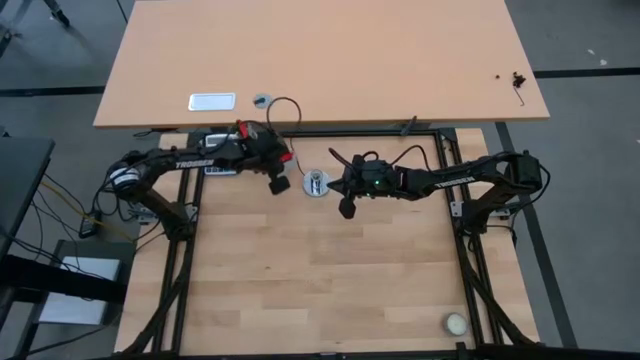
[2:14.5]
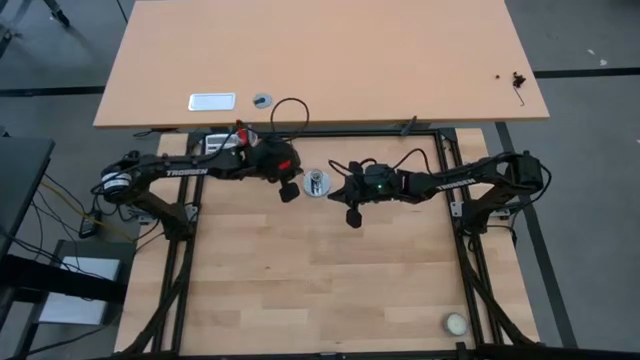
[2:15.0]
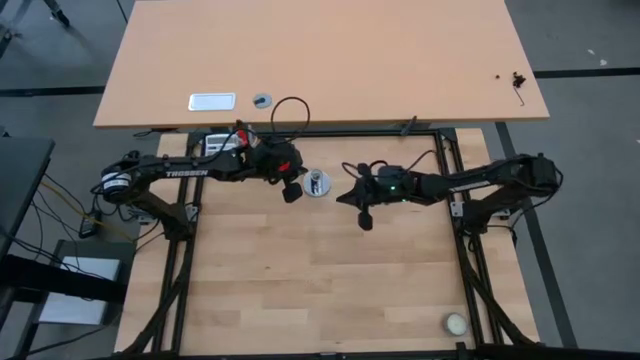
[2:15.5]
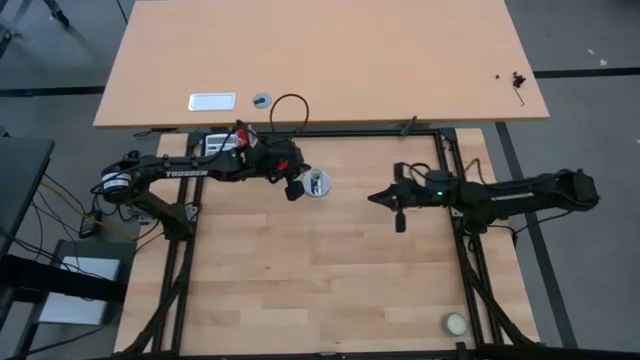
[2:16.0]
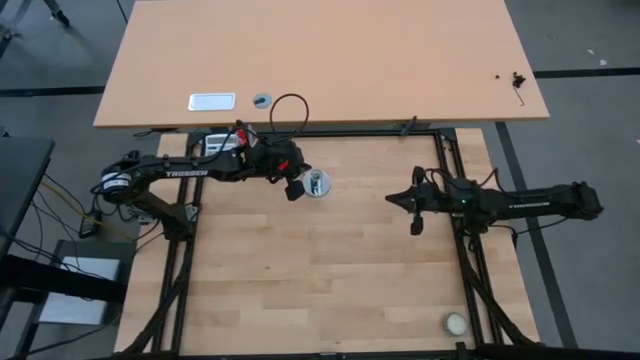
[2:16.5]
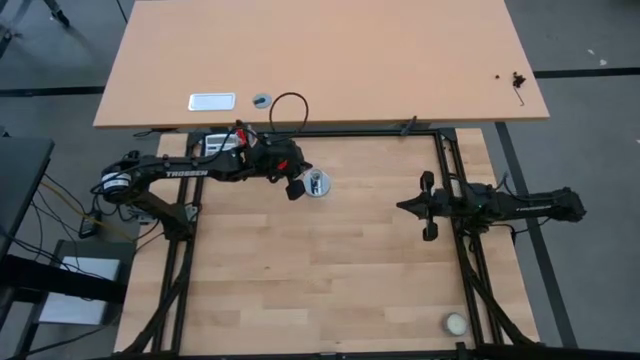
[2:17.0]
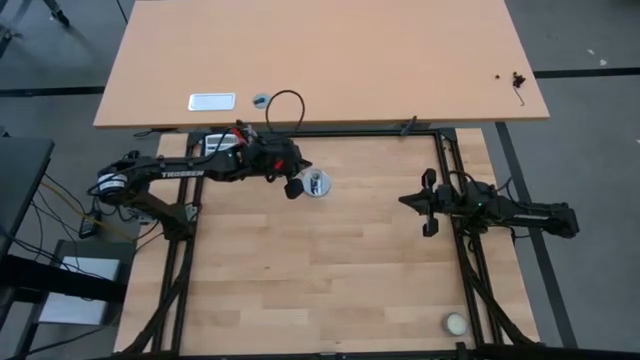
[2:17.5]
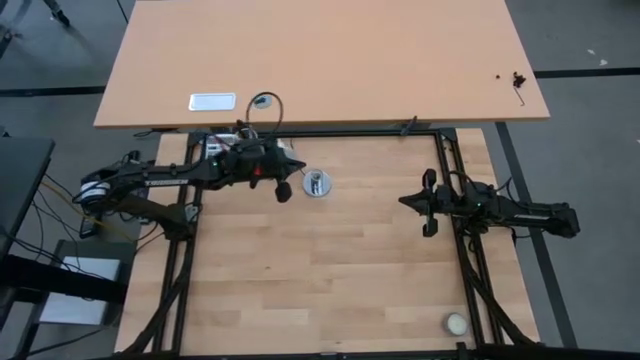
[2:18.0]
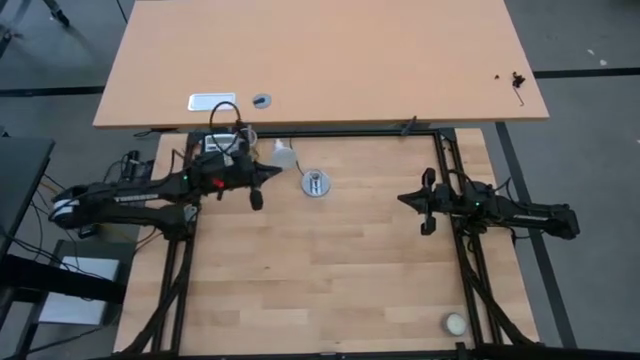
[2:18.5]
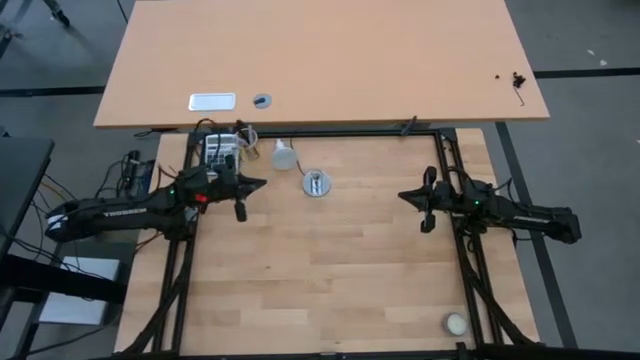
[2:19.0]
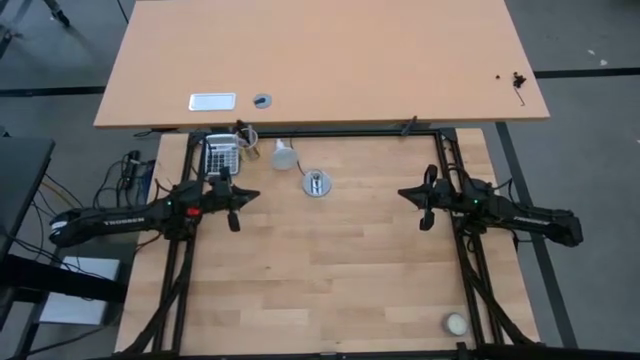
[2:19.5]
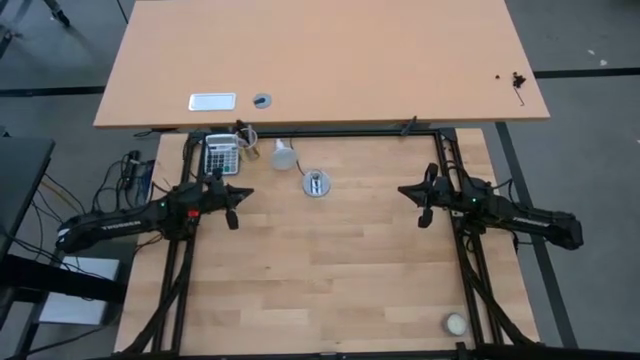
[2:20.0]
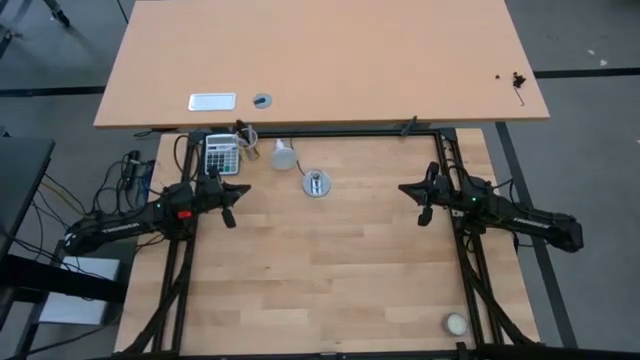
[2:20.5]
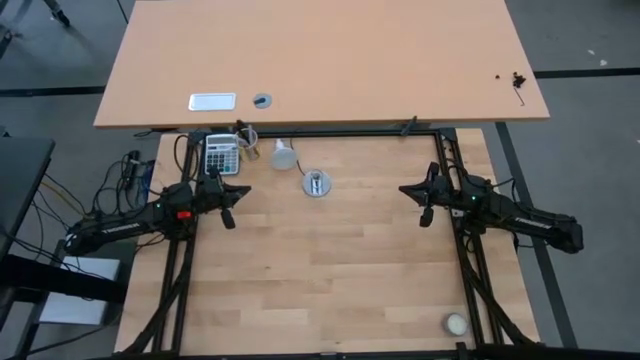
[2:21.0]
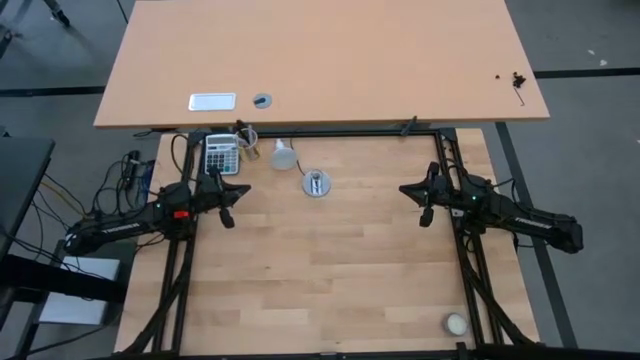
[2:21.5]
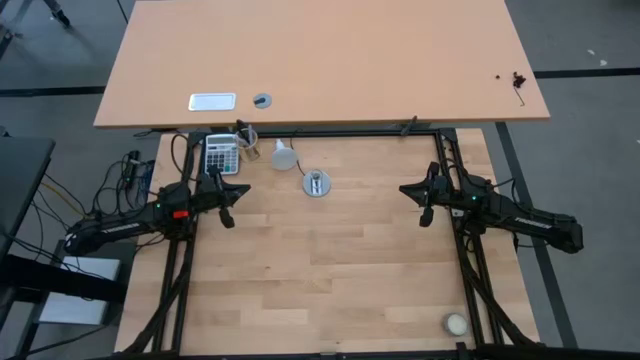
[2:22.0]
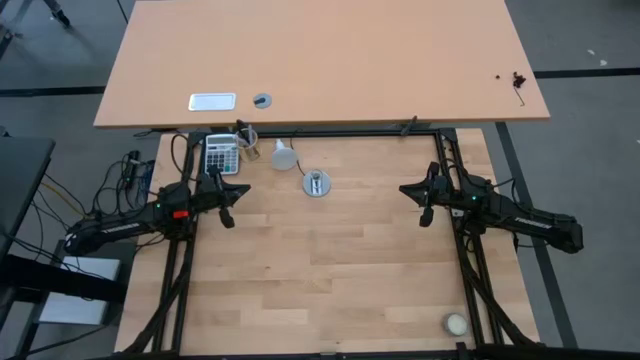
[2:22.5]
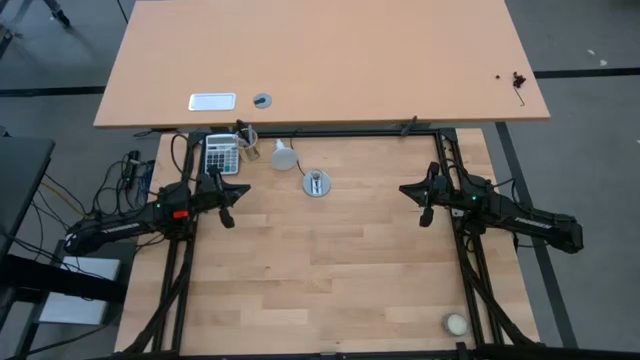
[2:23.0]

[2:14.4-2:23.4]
Task: Screw lightbulb
Return to Home Position

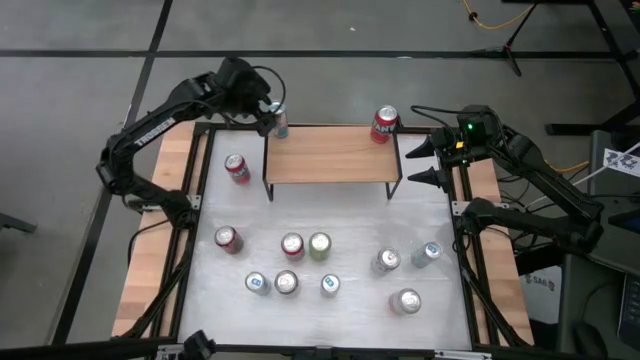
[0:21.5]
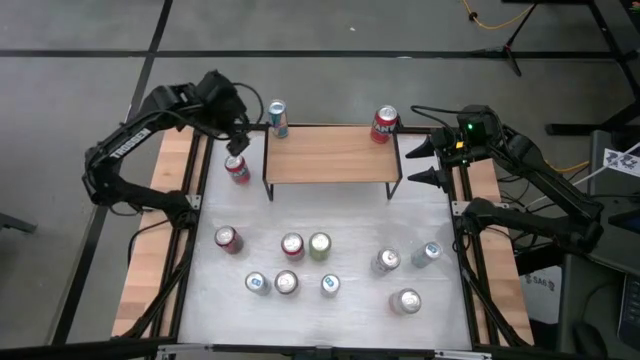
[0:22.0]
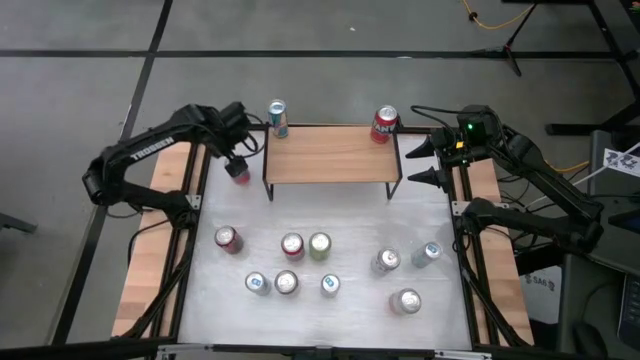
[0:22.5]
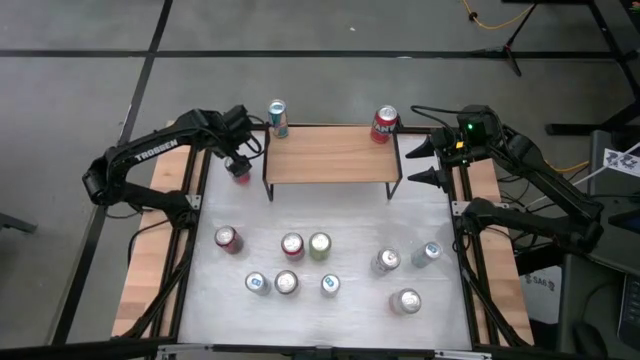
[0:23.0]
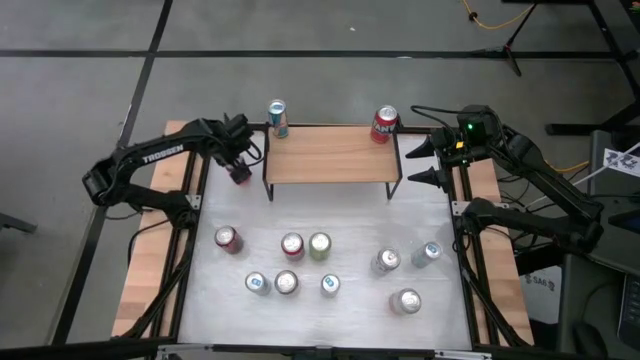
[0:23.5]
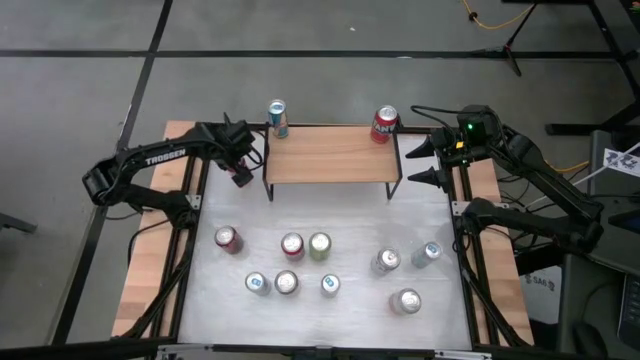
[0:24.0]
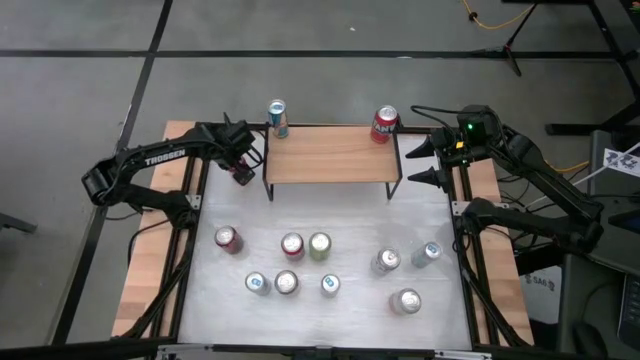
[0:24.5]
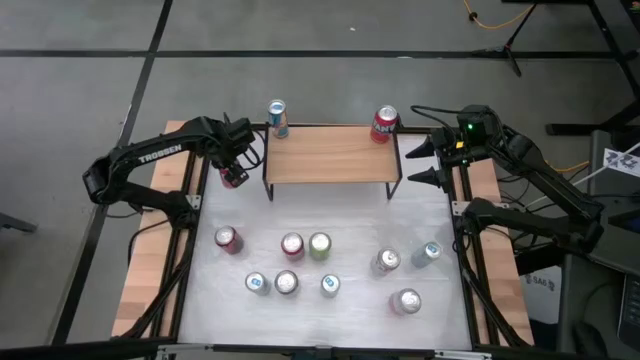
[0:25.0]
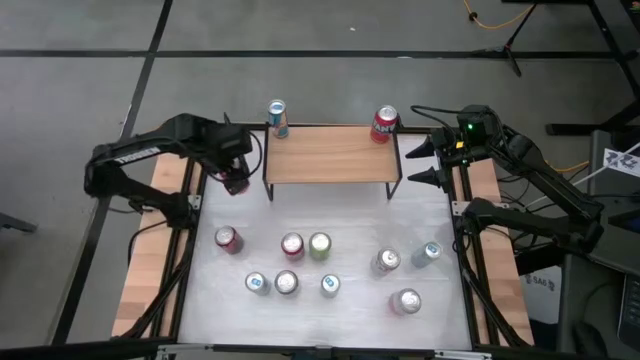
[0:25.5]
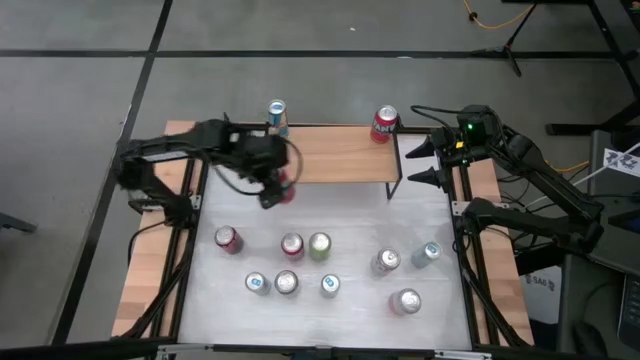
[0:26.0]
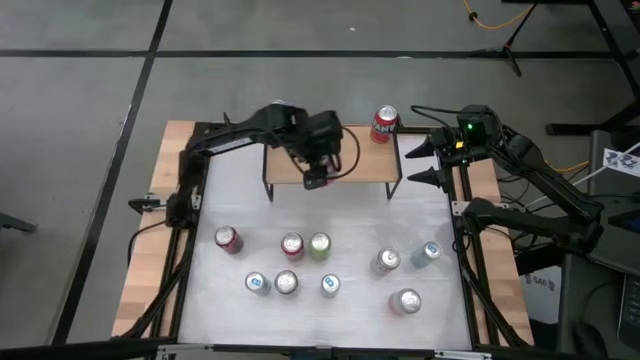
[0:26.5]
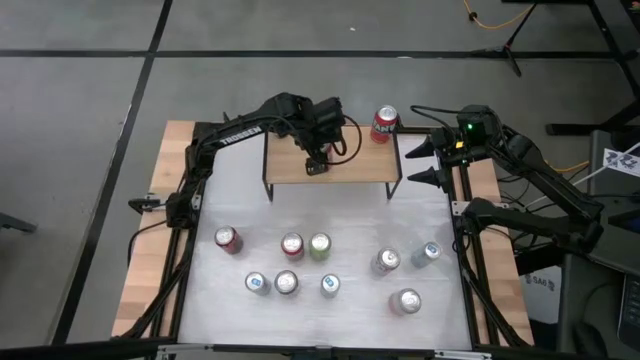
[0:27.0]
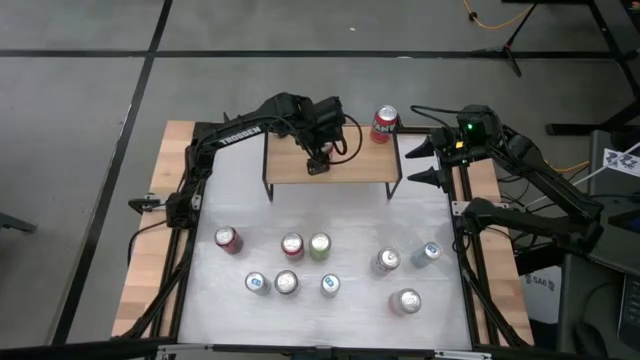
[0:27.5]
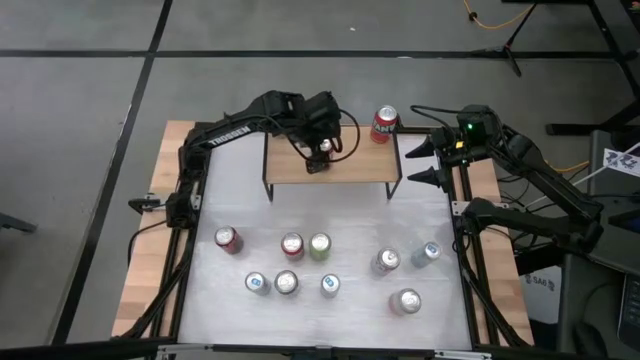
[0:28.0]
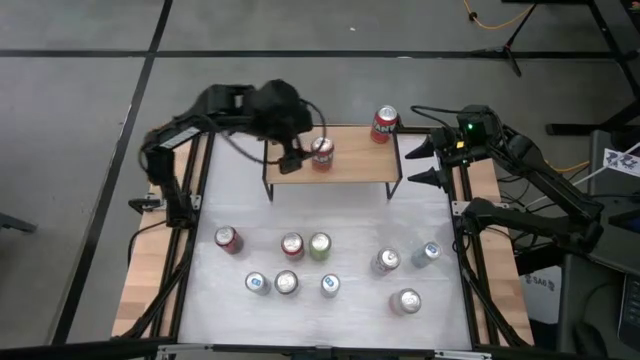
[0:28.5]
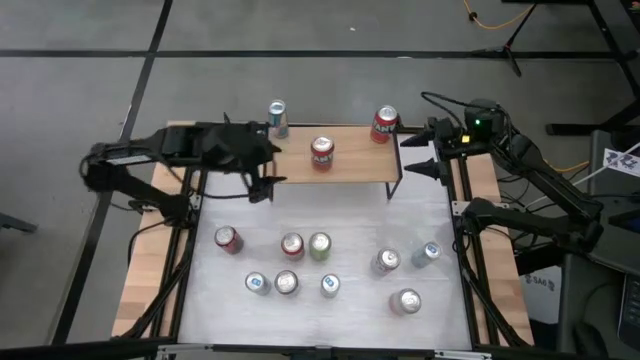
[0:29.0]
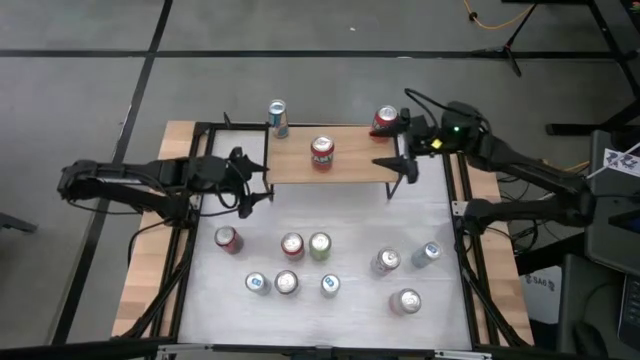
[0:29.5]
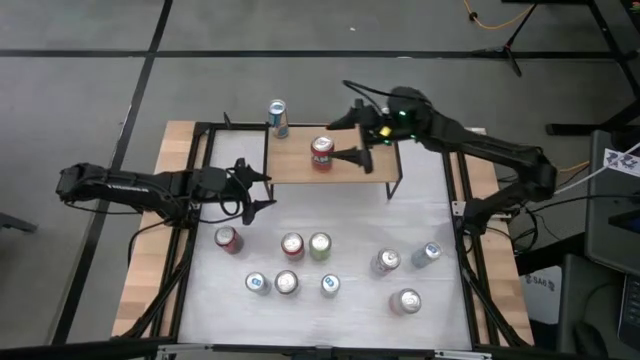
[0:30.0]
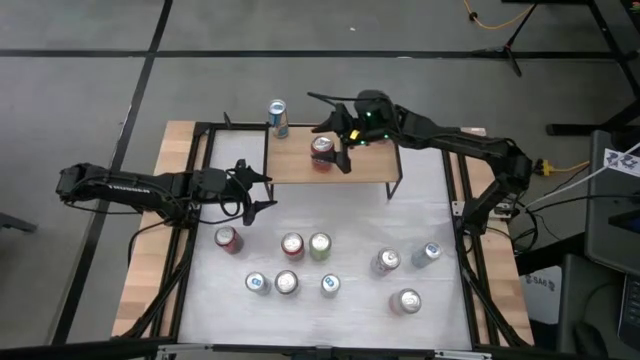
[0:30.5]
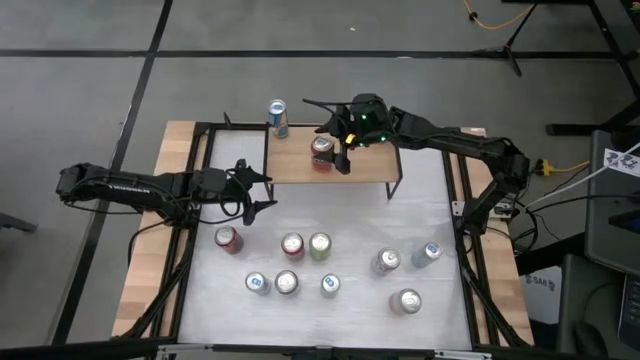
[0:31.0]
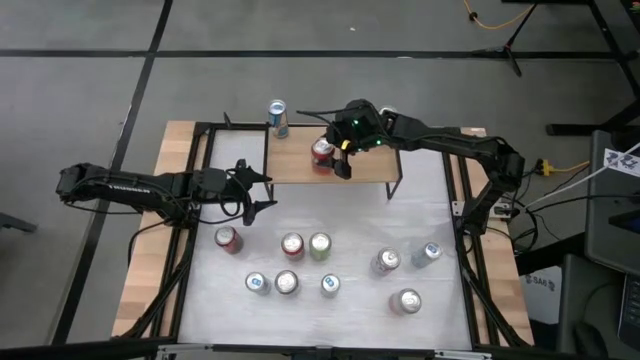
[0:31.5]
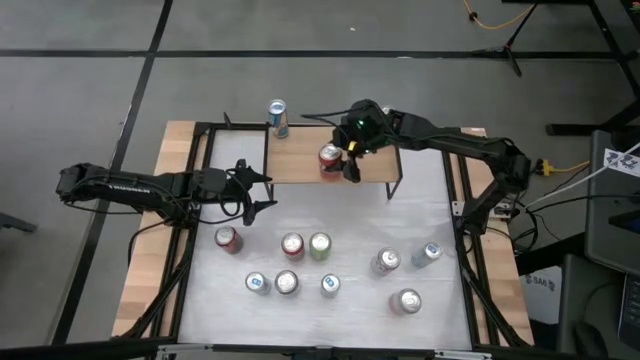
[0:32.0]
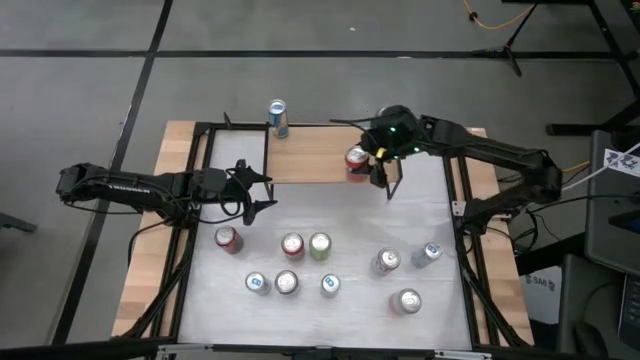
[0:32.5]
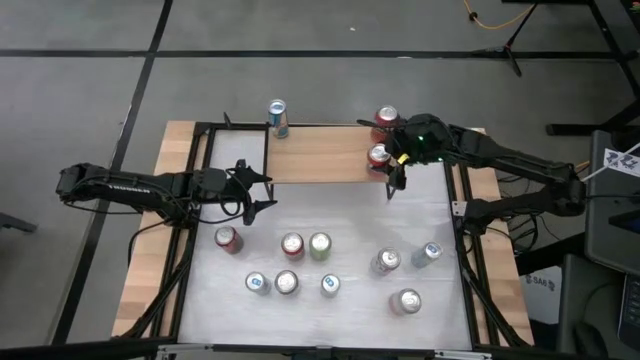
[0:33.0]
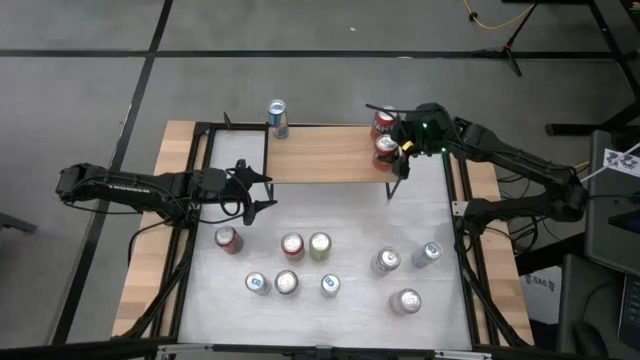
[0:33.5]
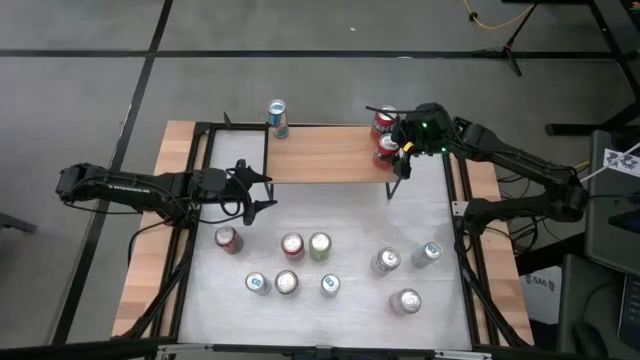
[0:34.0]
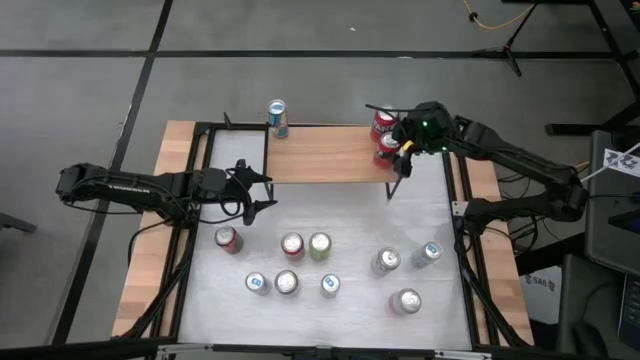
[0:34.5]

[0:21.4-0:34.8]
Task: Sort soda cans
Put the top red soda can on the shelf aligned with the red soda can
